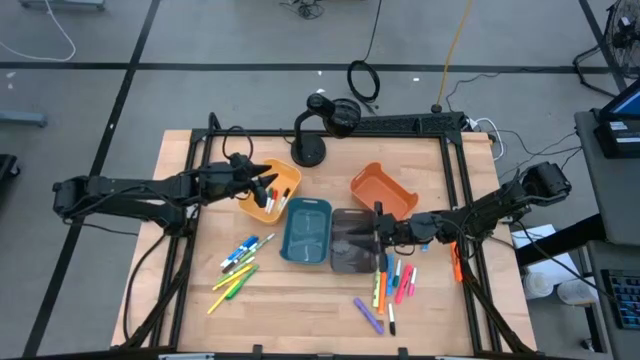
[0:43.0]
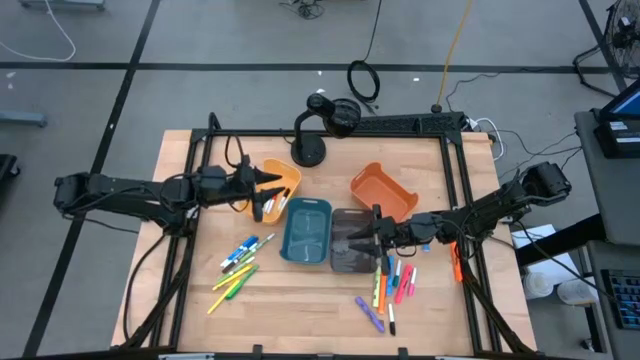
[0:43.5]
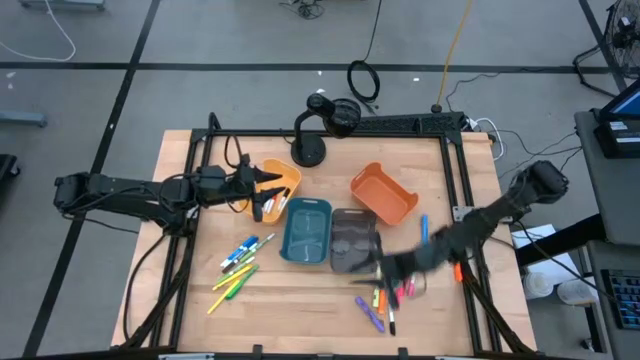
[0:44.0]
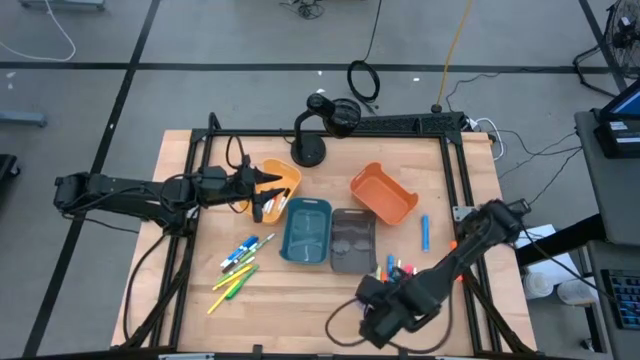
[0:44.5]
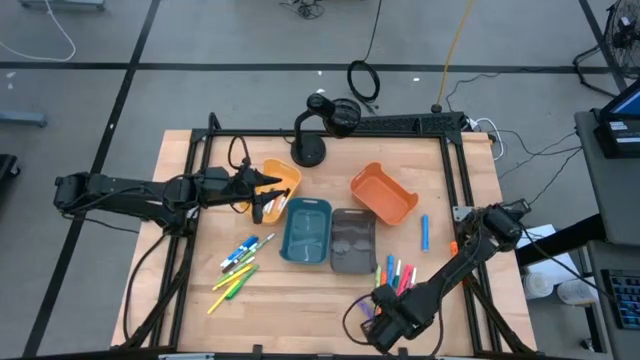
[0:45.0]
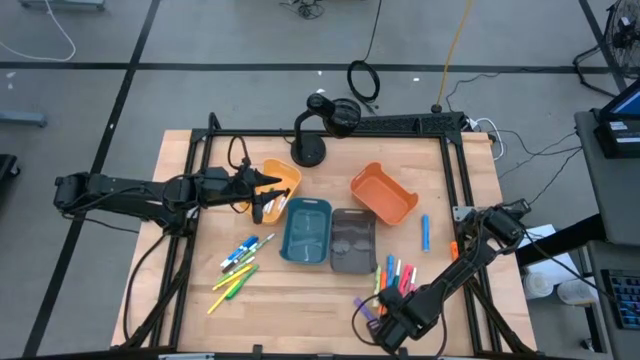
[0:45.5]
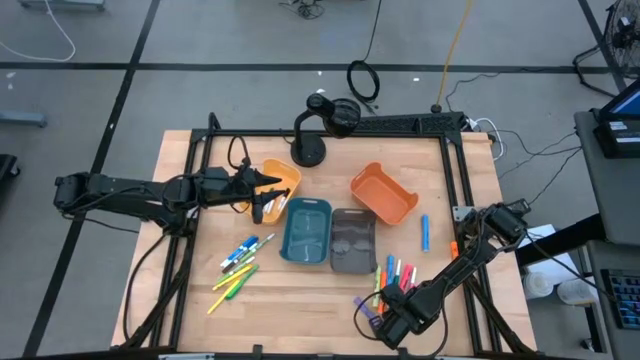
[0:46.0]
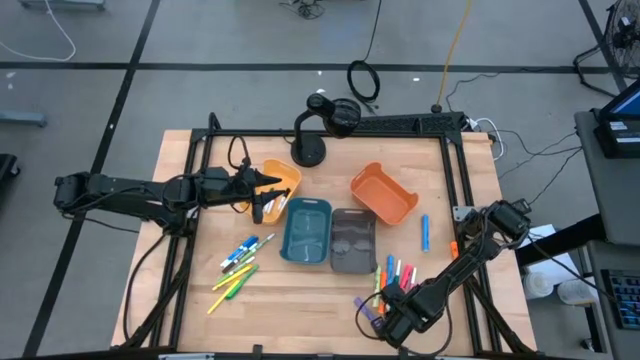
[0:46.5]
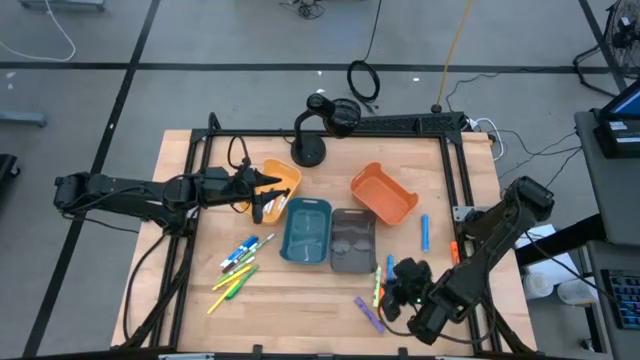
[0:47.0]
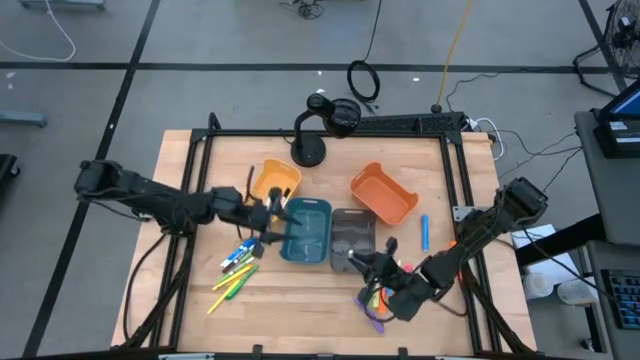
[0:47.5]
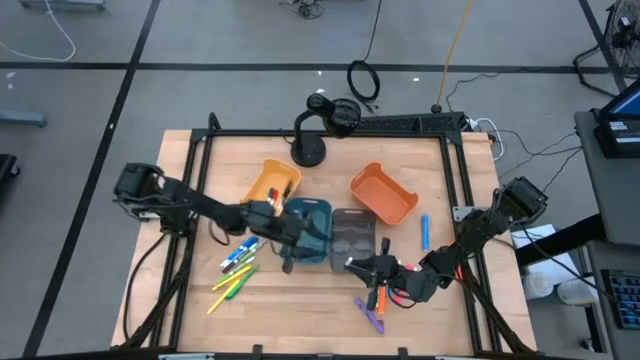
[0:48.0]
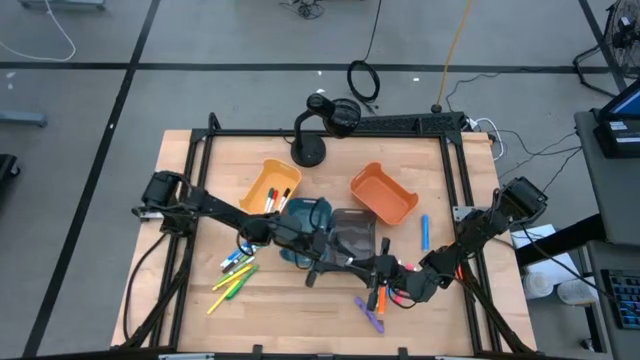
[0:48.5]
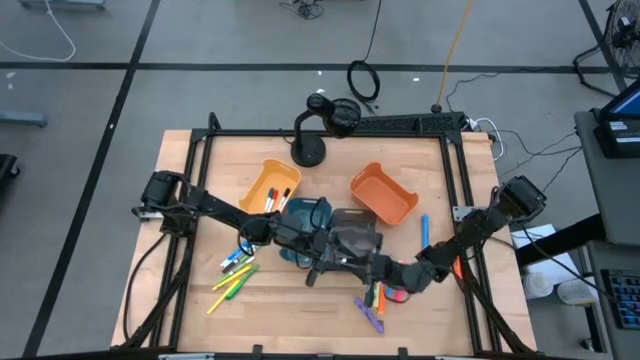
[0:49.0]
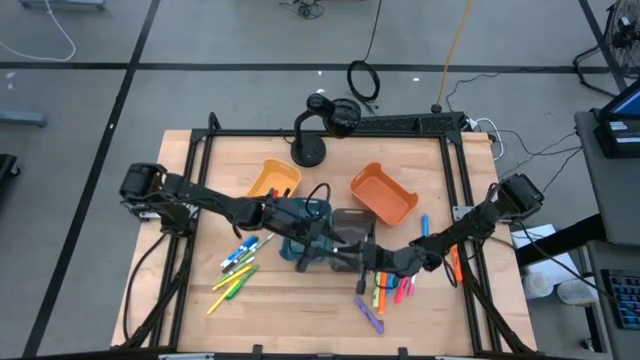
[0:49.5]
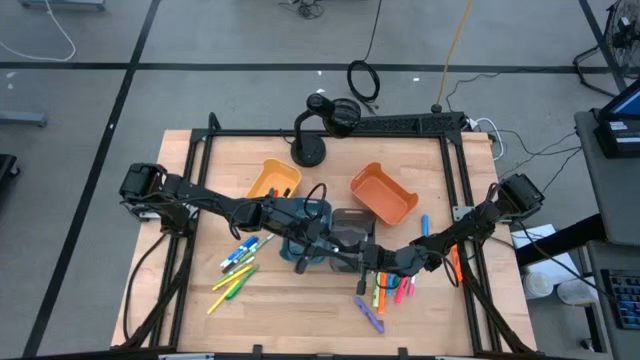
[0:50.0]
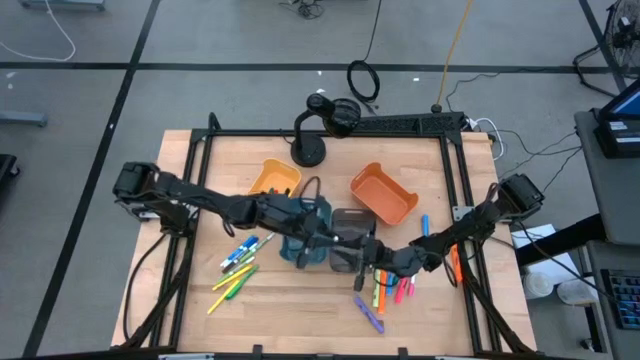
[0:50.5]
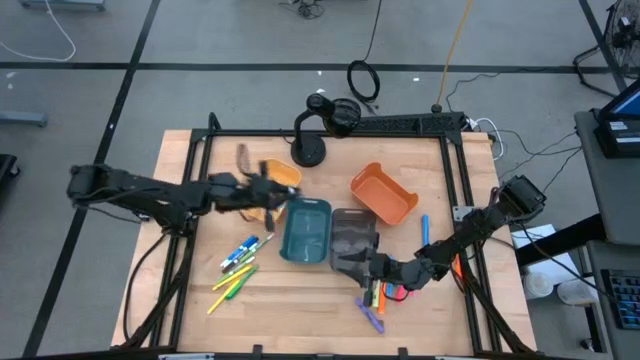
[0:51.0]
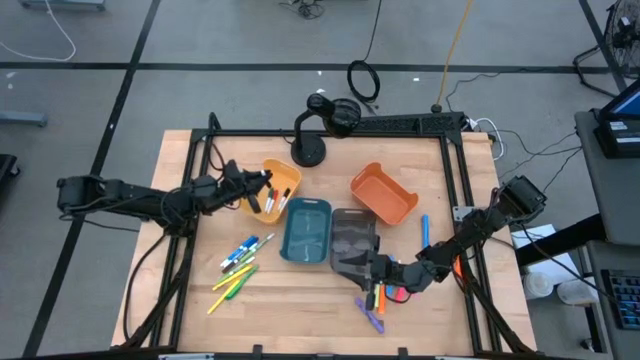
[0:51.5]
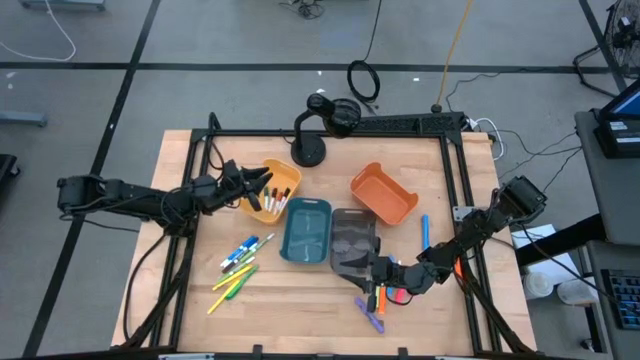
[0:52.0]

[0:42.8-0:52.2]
Task: Pick & Place Markers
Put the white and black highlighter into the yellow bin

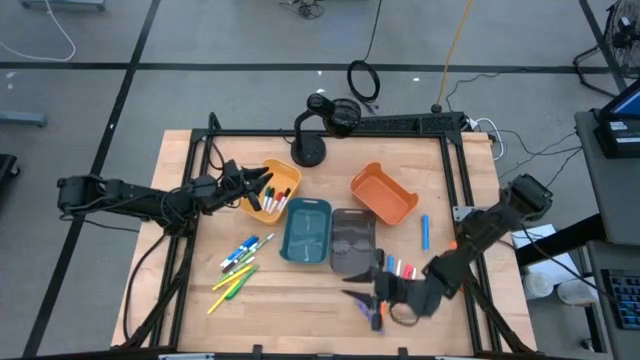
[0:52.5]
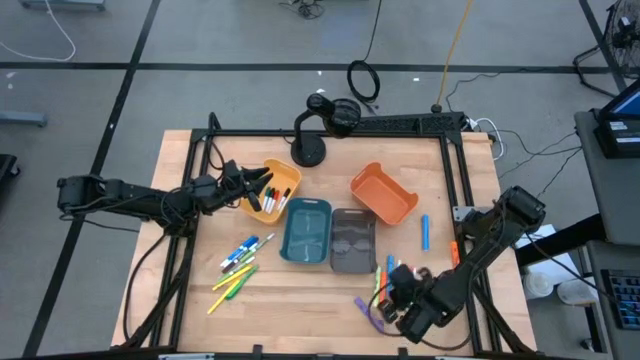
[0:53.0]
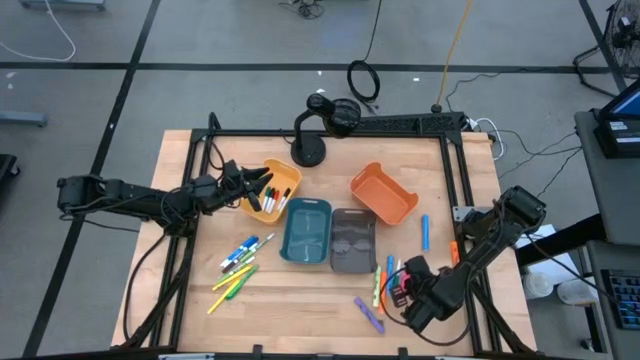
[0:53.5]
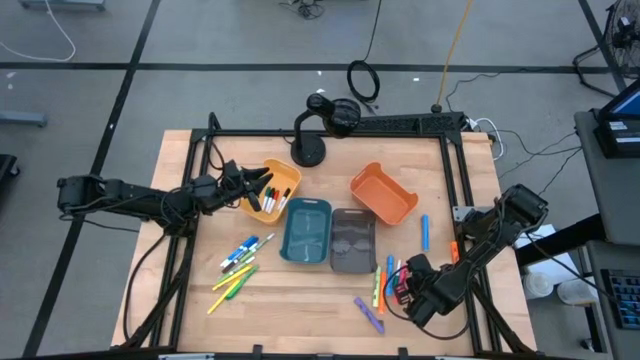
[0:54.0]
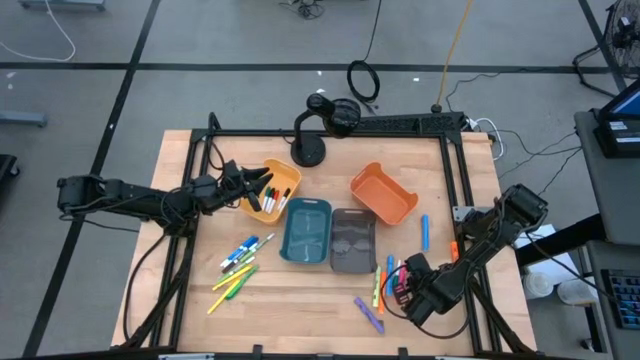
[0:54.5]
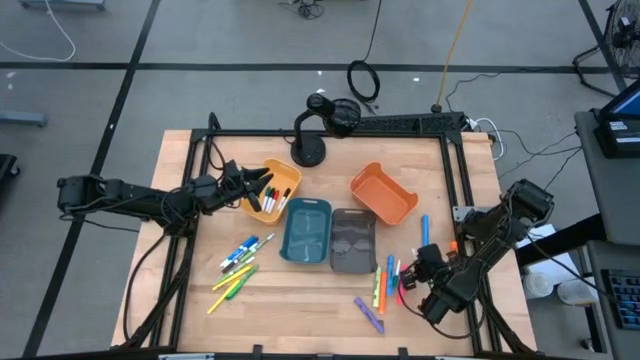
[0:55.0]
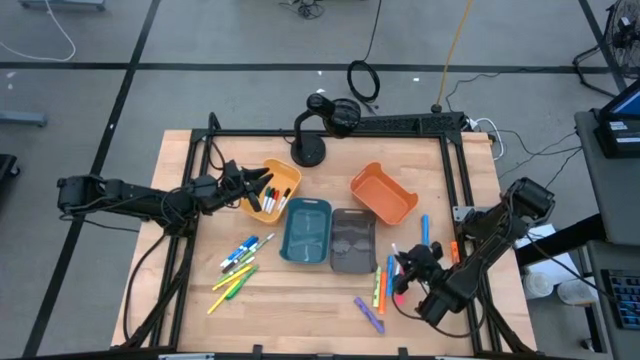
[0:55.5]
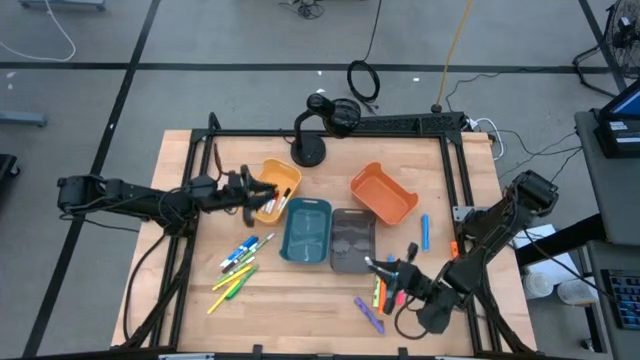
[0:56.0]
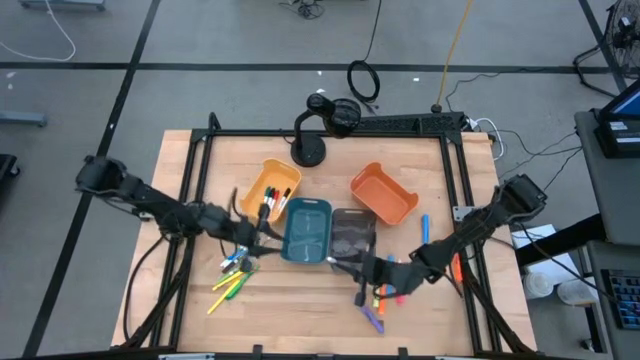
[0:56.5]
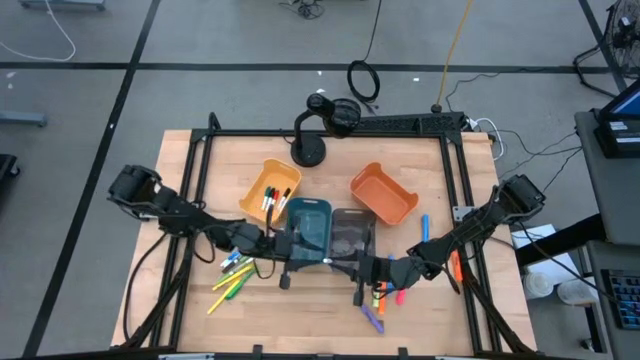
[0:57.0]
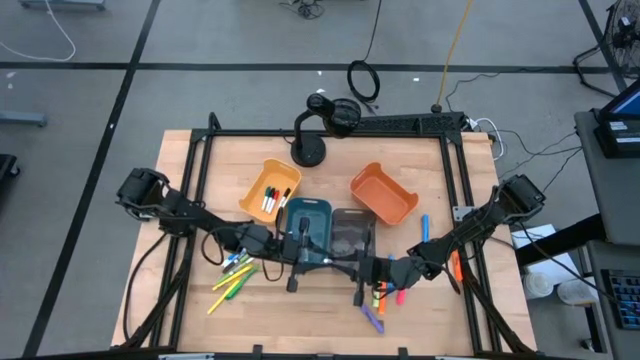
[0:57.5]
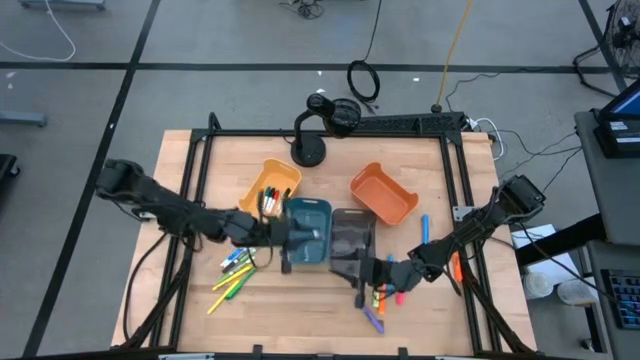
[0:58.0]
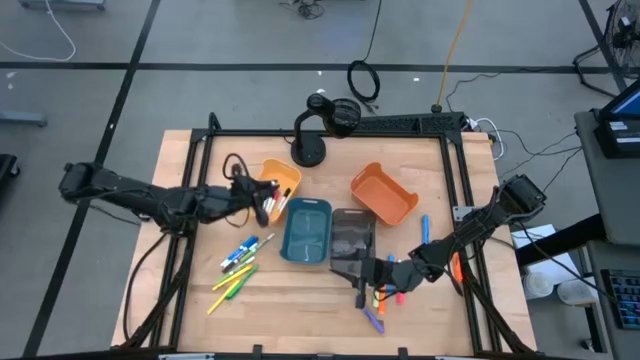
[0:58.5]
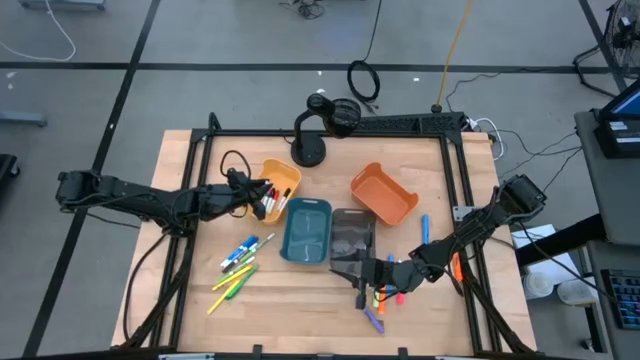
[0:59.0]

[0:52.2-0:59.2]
Put the white and pink highlighter into the yellow bin

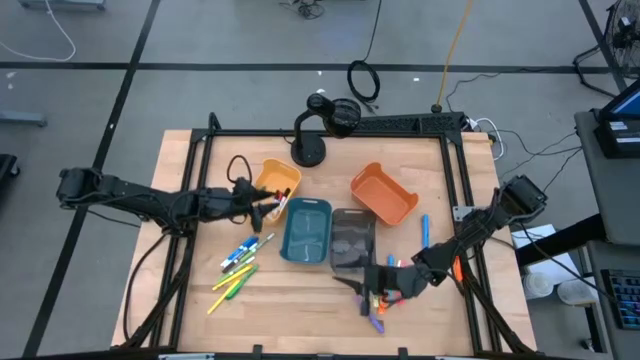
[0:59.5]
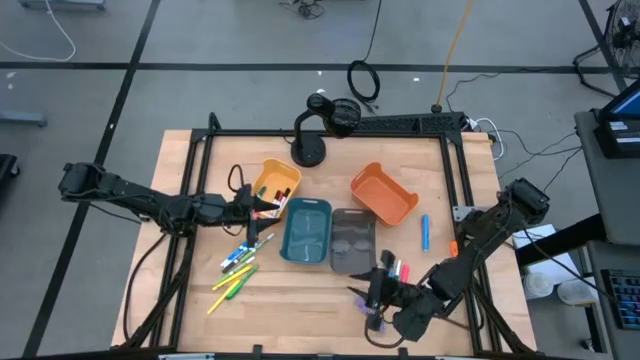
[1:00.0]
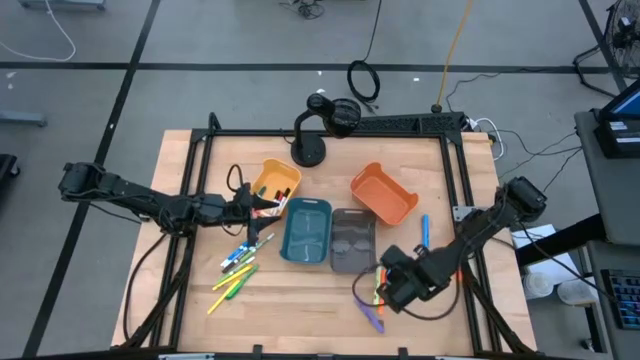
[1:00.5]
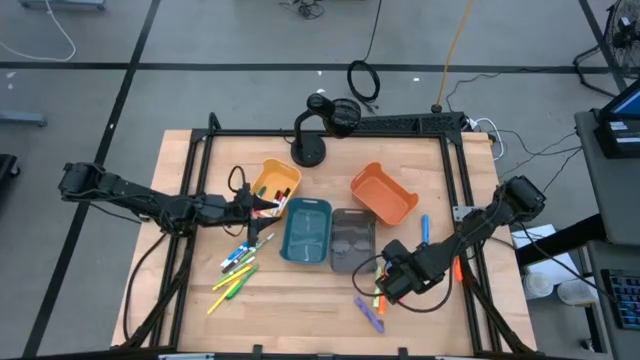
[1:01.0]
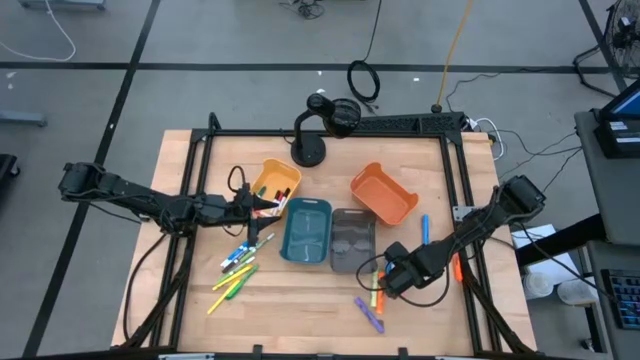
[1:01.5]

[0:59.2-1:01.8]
Put the white and green highlighter into the yellow bin

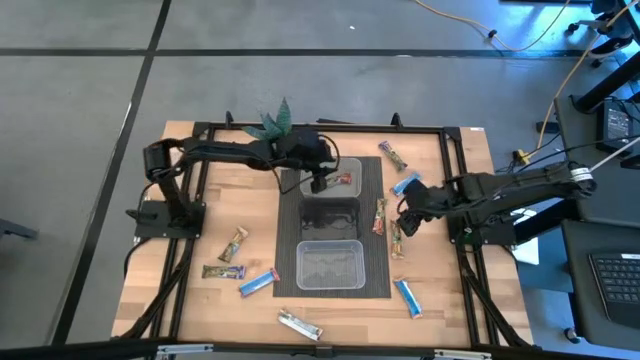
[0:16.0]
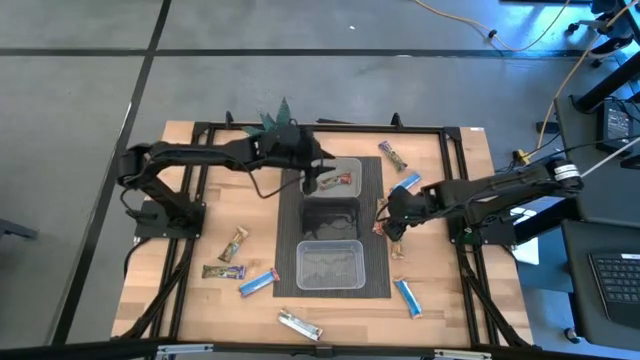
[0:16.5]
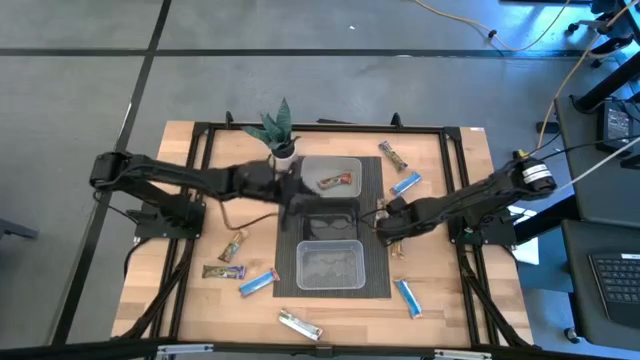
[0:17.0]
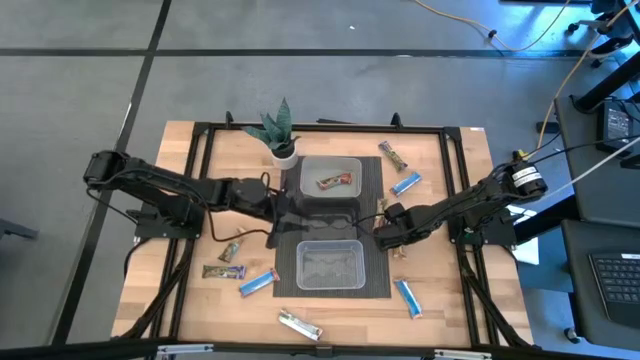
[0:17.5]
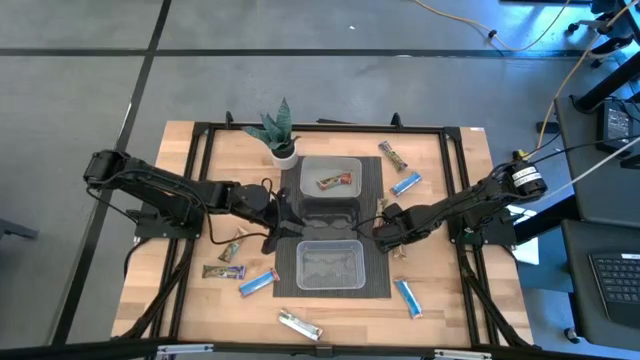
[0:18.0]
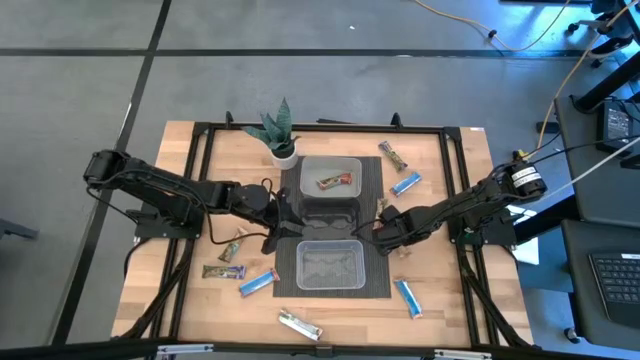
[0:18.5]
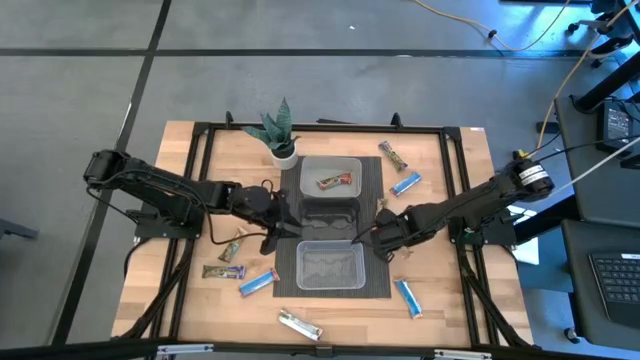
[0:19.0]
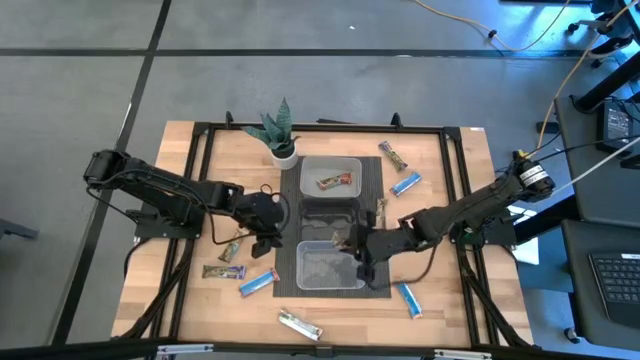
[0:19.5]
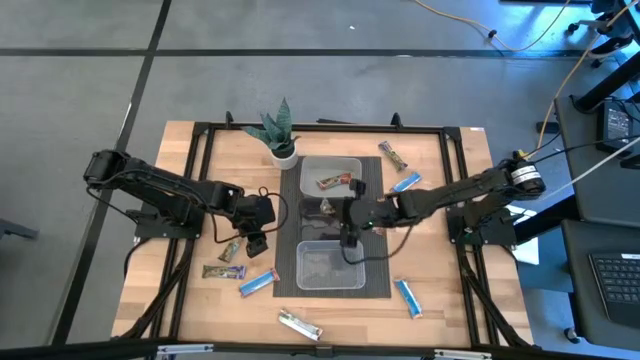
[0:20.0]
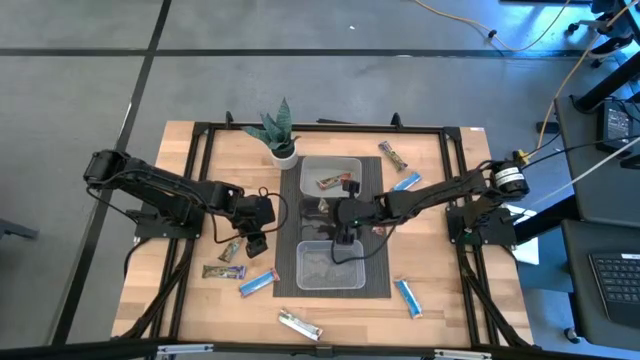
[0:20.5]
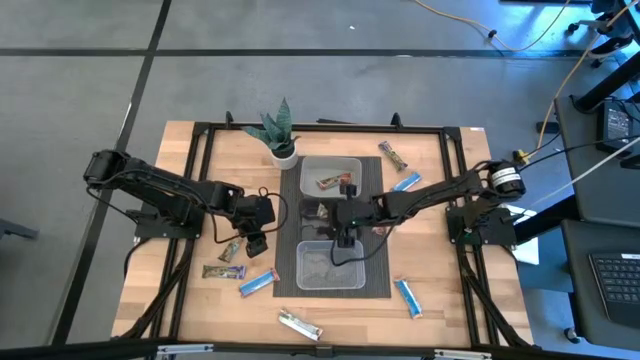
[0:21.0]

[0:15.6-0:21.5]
Task: Pick and place Granola Bars by type
Put the yellow granola bar into the black bin
